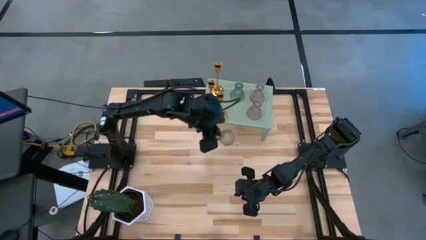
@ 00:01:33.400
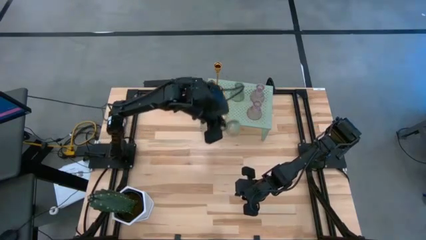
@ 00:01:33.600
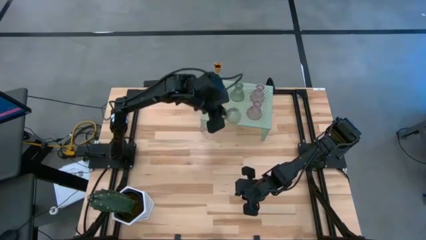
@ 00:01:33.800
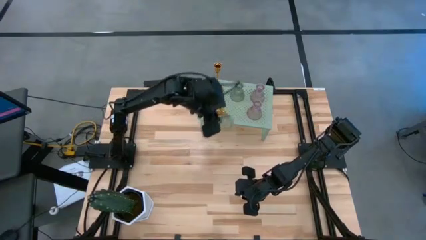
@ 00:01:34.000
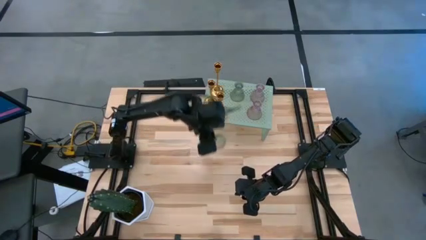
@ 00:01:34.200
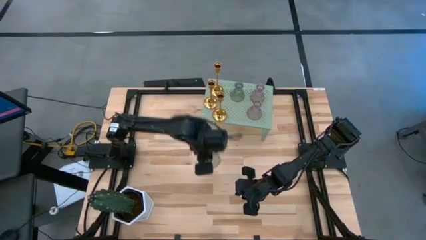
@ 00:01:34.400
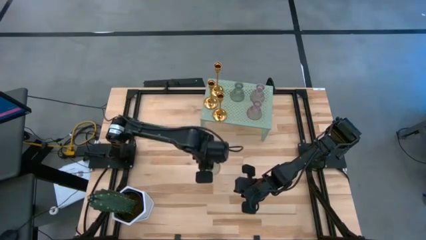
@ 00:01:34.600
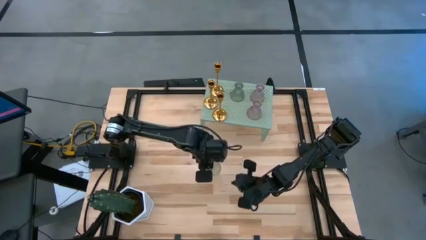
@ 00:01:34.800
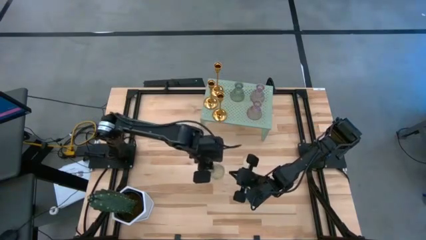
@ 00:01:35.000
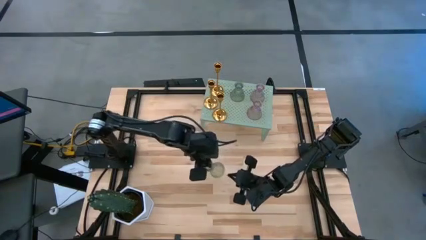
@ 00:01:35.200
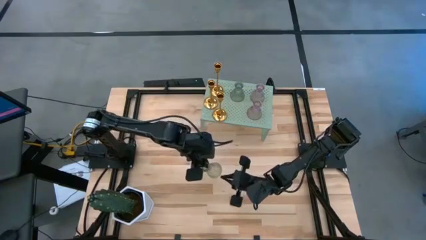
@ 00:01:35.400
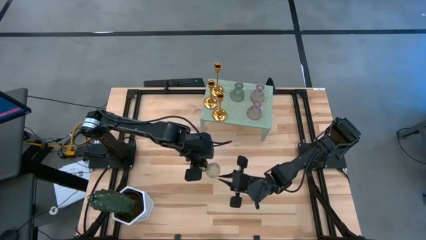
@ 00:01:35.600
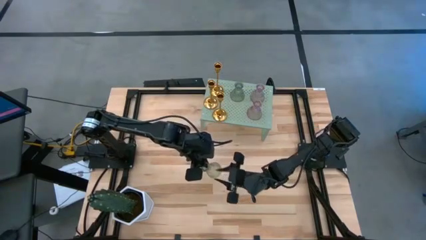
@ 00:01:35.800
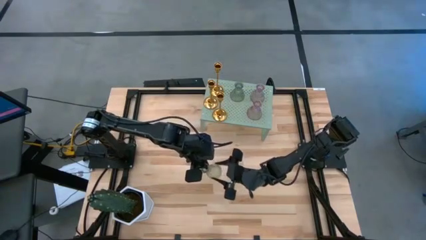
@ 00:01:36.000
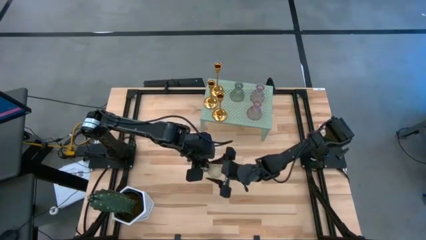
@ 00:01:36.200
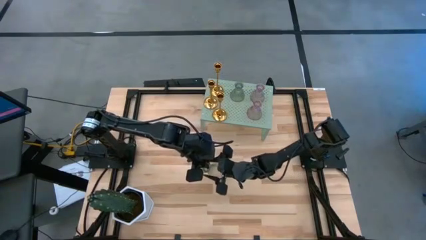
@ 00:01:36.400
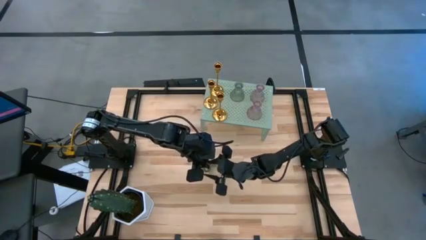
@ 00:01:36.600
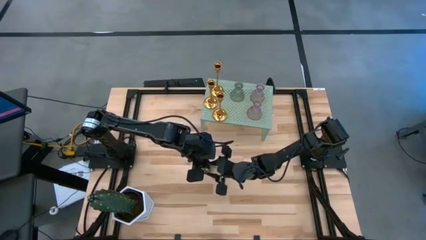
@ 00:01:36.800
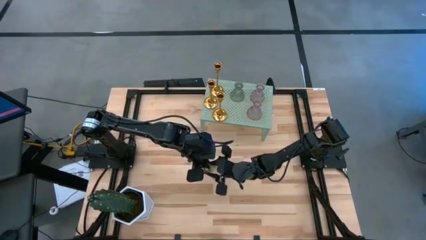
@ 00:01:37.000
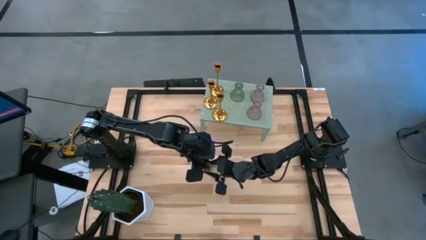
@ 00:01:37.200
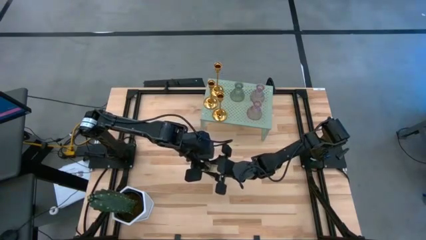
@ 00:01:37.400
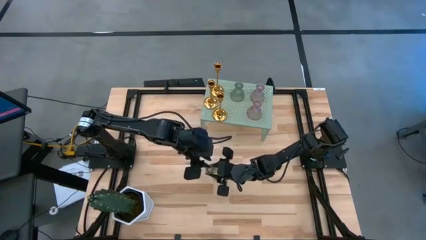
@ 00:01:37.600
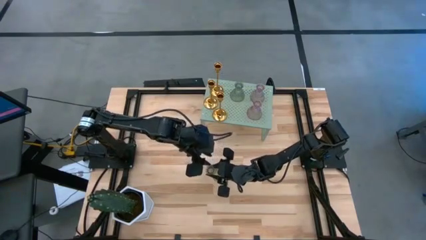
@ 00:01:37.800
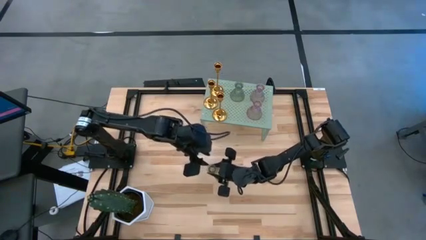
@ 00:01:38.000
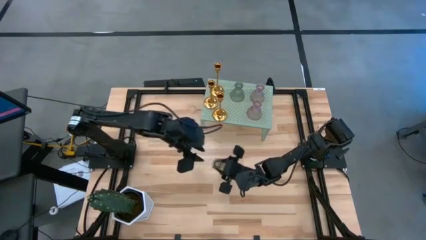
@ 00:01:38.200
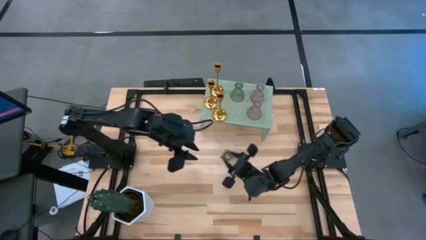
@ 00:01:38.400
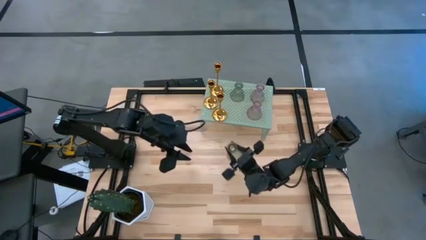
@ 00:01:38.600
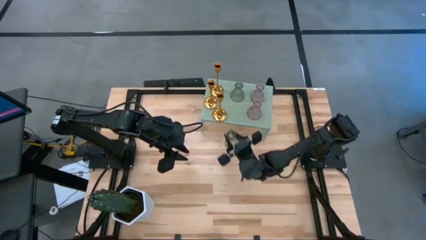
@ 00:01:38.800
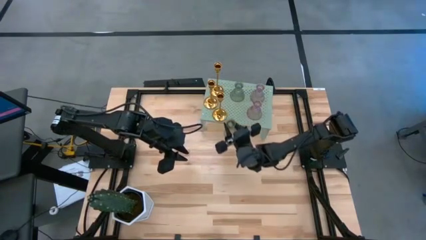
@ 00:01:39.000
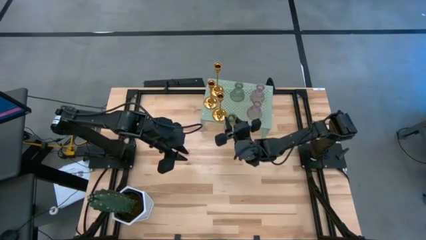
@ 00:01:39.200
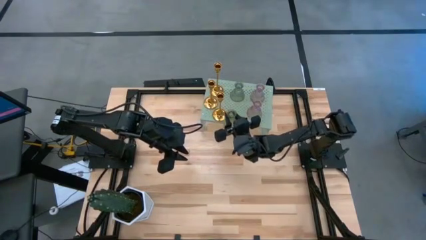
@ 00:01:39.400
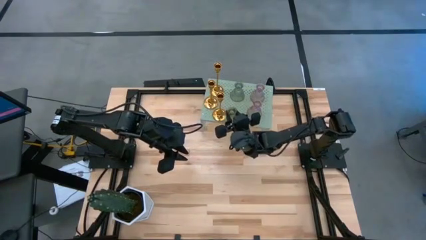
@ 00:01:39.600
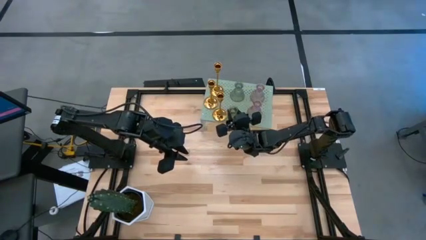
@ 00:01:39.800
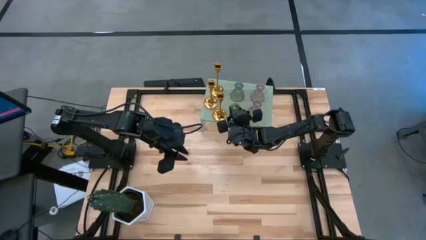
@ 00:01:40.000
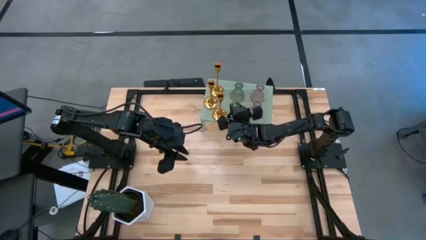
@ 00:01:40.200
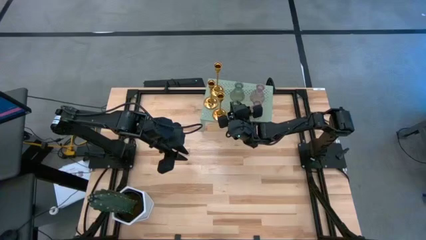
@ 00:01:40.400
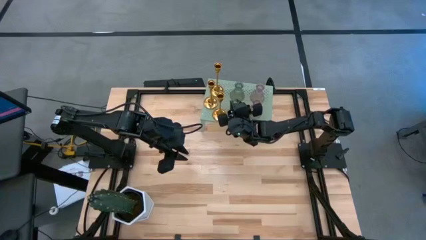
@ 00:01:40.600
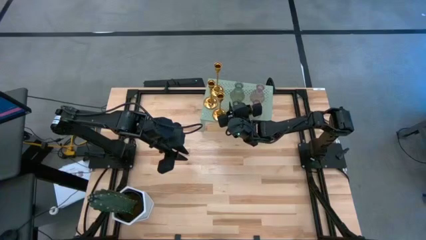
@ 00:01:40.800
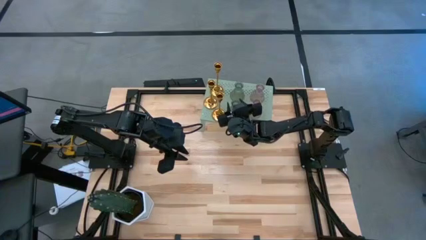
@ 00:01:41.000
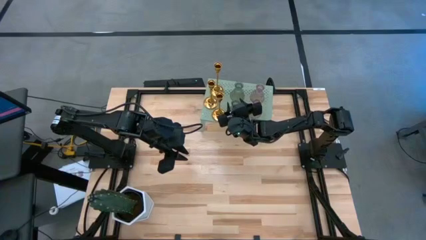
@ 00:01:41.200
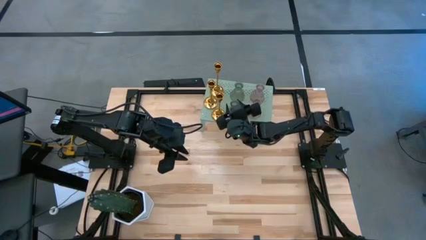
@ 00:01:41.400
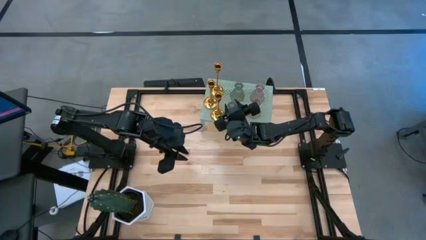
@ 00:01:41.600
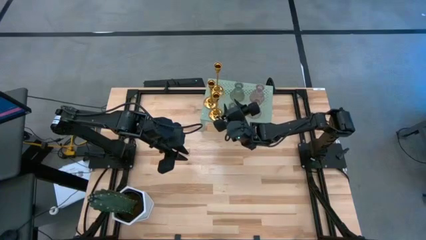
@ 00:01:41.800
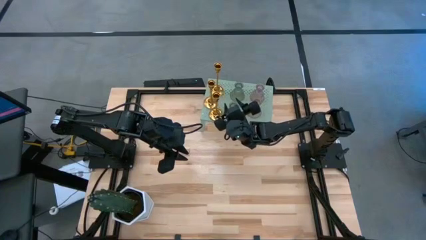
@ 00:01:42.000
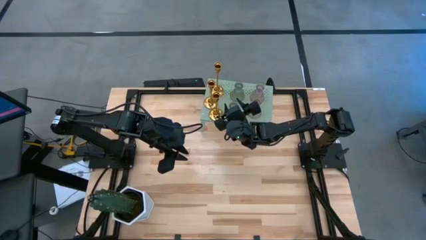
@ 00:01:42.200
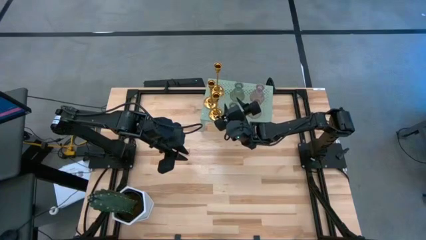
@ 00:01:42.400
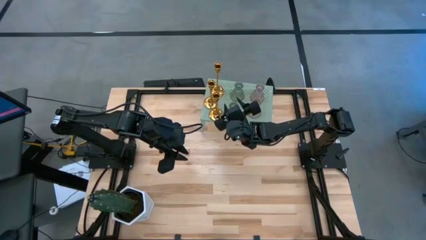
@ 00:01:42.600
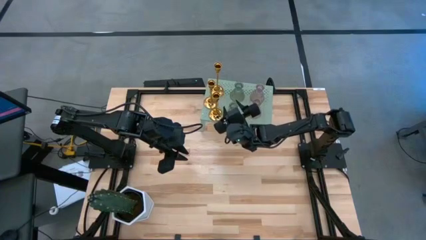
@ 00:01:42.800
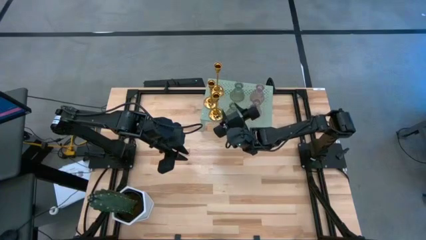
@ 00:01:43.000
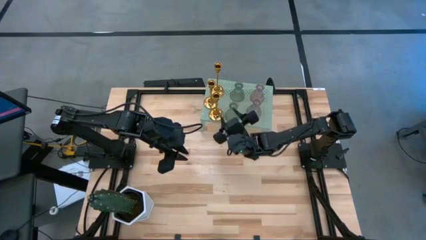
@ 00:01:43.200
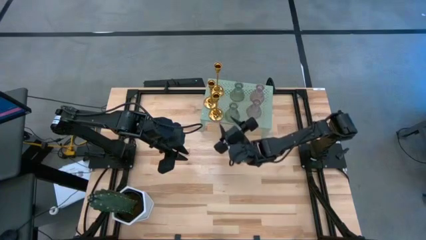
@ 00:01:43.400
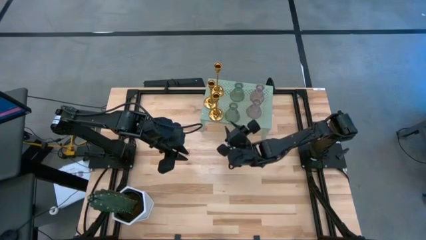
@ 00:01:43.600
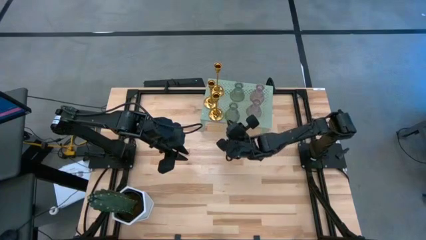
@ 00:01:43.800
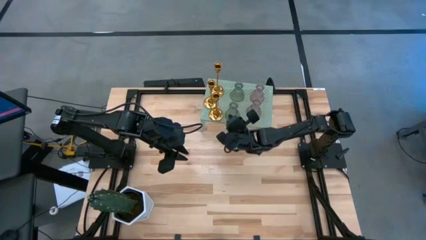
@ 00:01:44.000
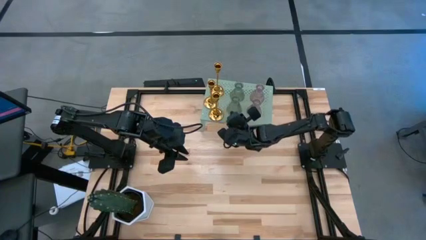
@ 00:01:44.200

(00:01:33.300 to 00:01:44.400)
Task: Pick & Place candle stick holders
Put the green candle holder on the shelf aligned with the other green candle holder
